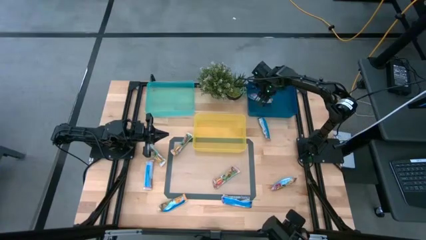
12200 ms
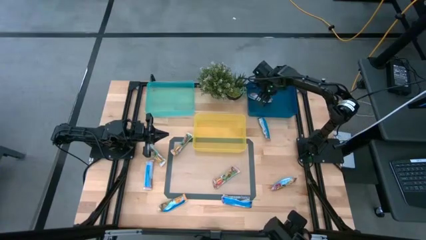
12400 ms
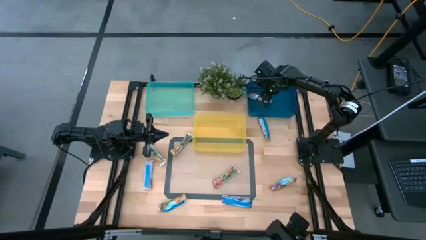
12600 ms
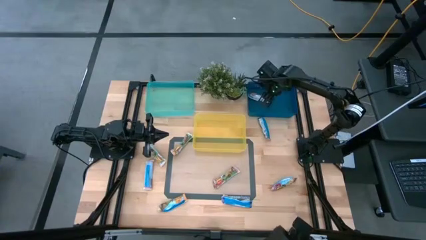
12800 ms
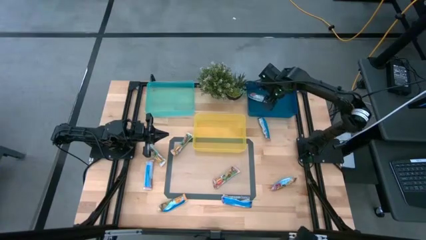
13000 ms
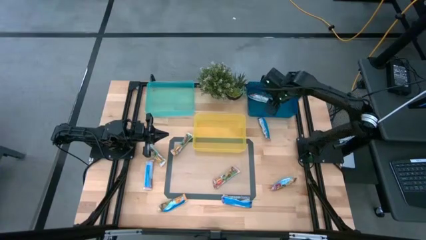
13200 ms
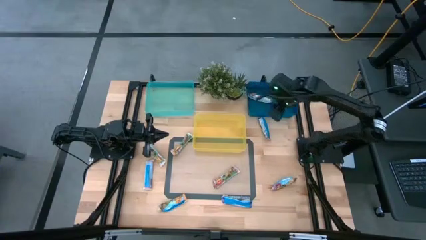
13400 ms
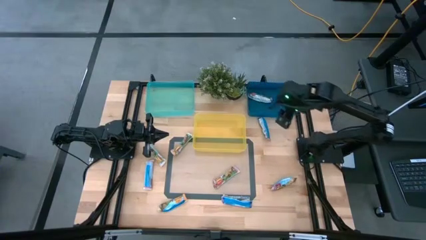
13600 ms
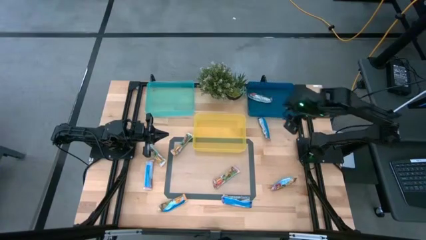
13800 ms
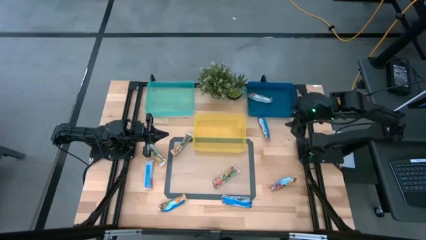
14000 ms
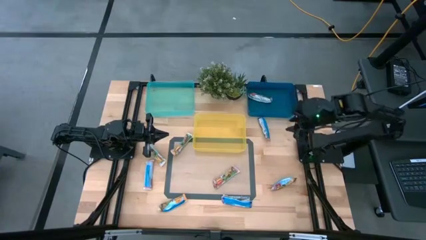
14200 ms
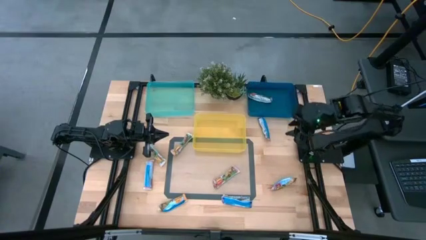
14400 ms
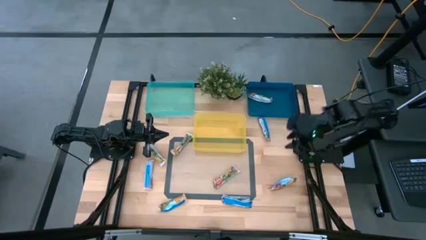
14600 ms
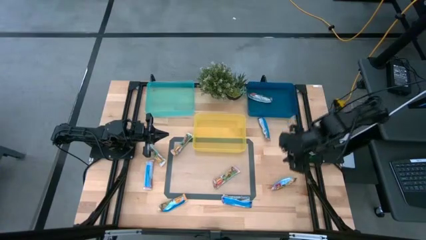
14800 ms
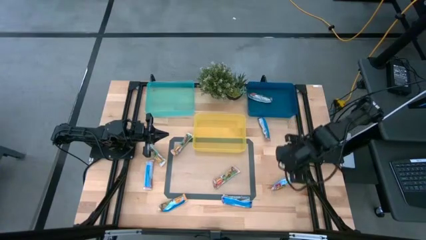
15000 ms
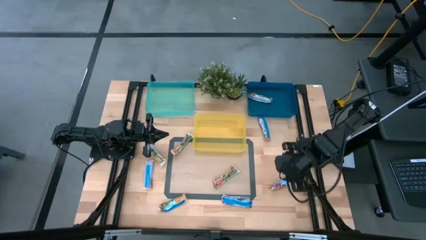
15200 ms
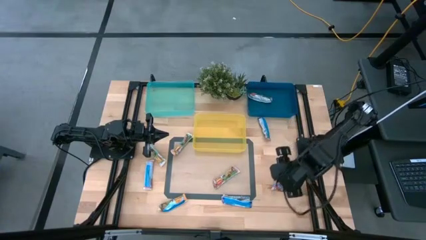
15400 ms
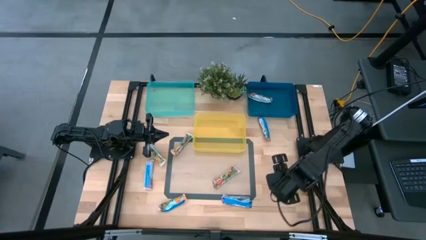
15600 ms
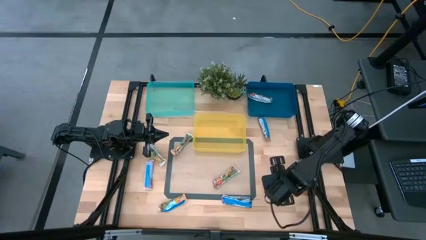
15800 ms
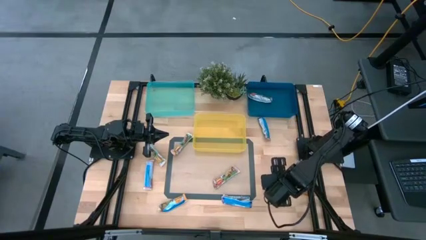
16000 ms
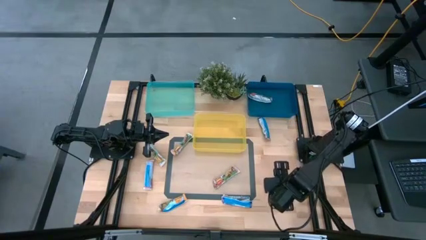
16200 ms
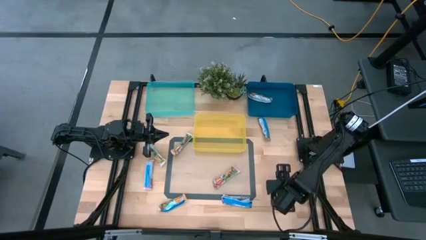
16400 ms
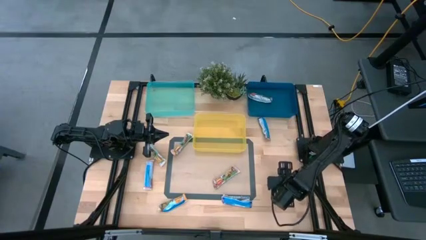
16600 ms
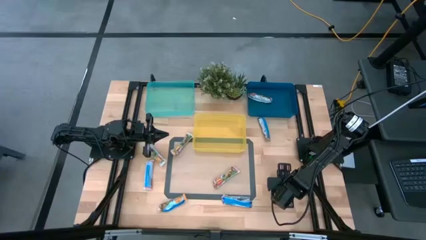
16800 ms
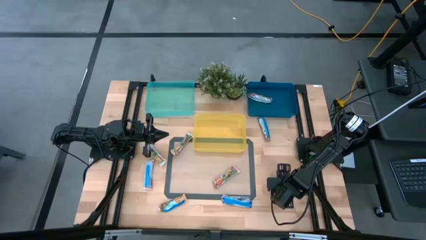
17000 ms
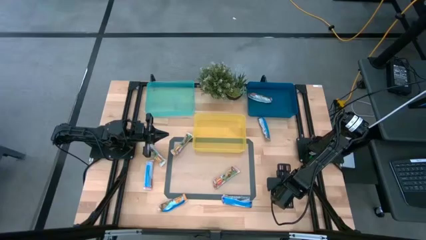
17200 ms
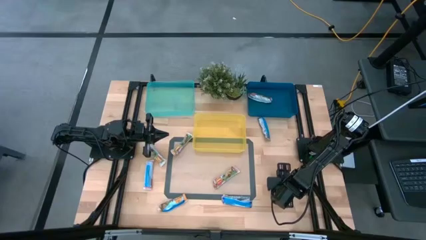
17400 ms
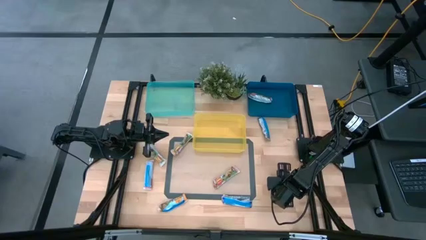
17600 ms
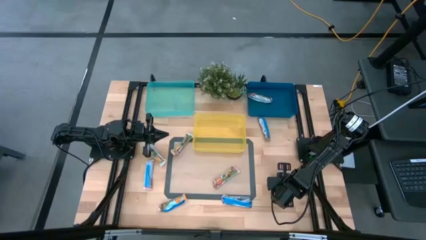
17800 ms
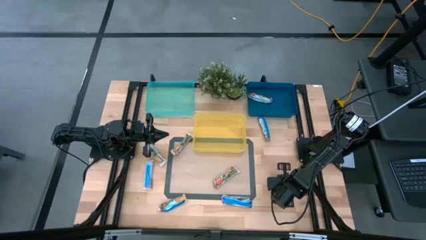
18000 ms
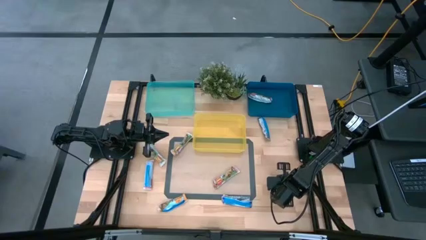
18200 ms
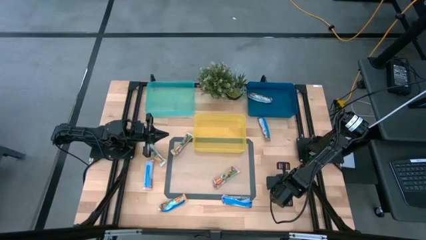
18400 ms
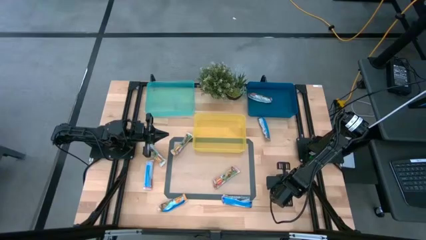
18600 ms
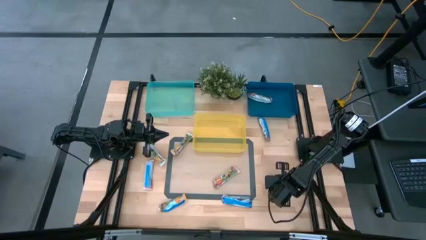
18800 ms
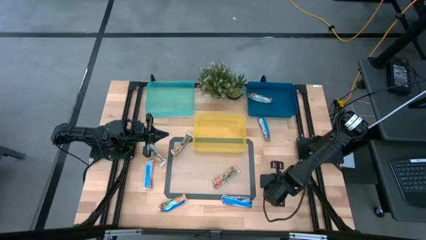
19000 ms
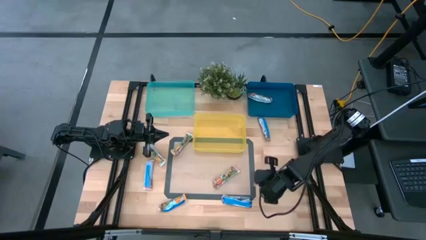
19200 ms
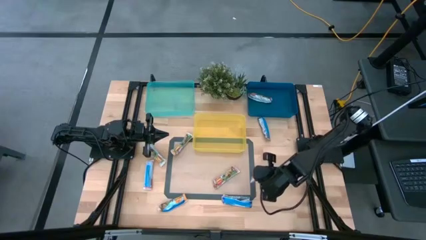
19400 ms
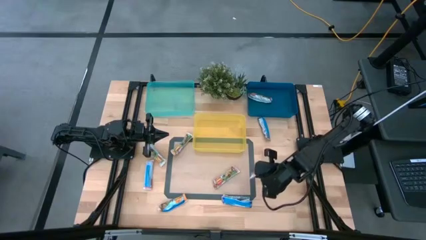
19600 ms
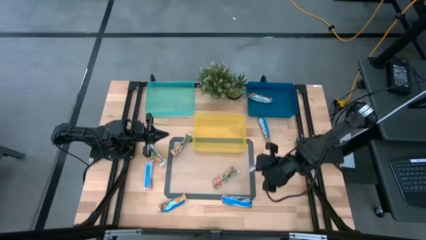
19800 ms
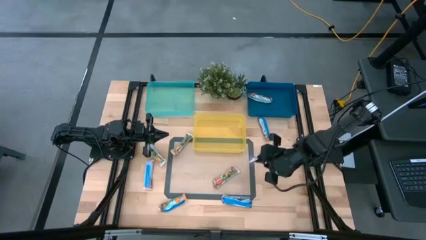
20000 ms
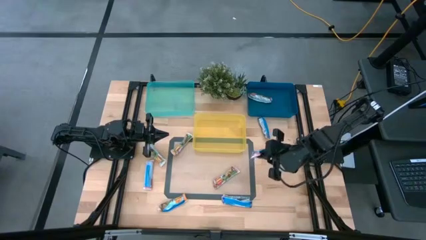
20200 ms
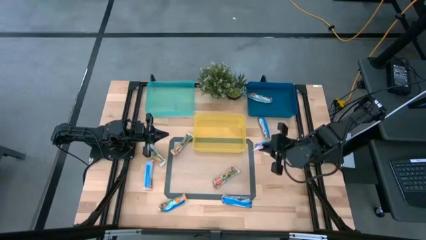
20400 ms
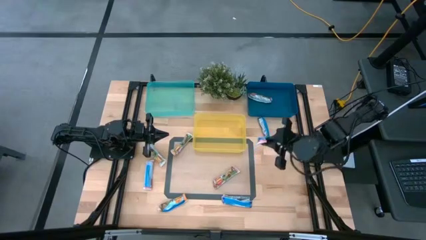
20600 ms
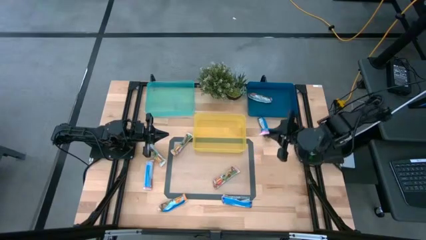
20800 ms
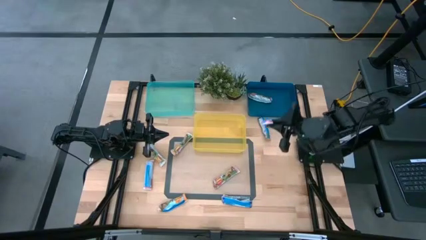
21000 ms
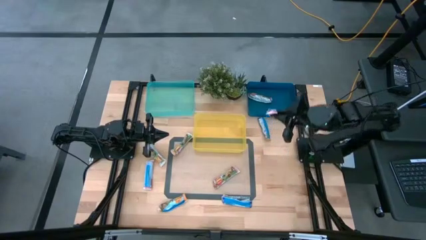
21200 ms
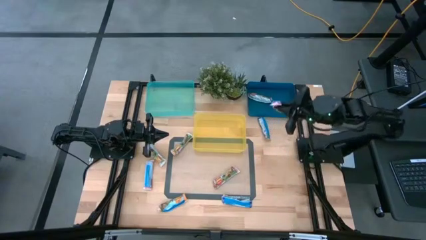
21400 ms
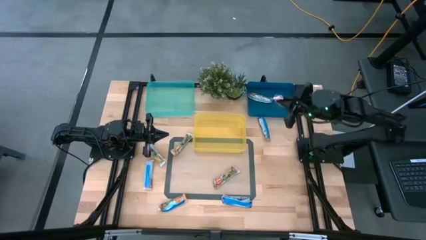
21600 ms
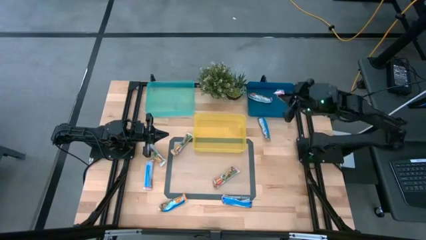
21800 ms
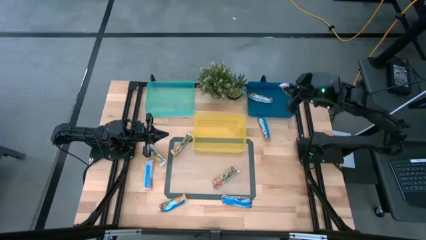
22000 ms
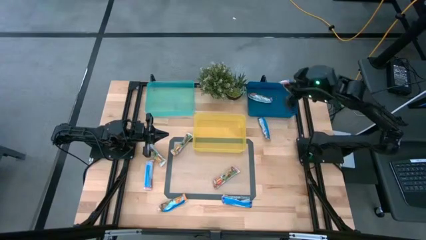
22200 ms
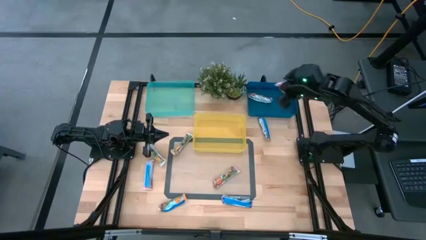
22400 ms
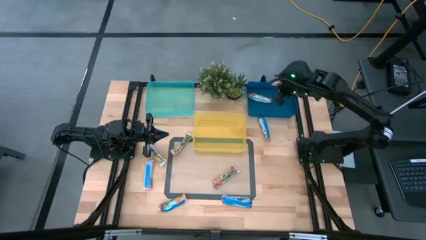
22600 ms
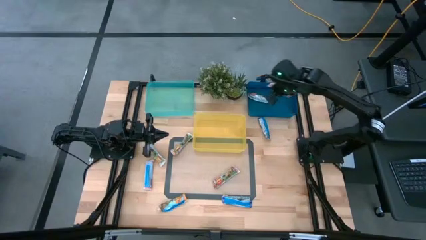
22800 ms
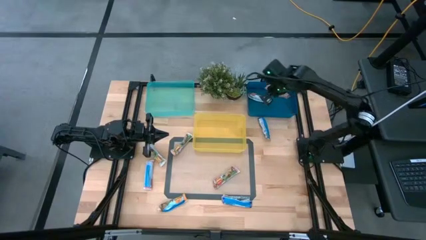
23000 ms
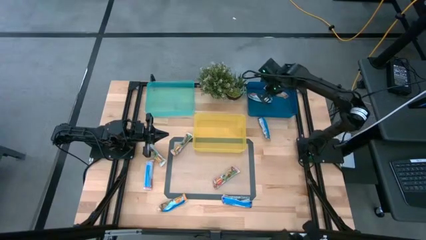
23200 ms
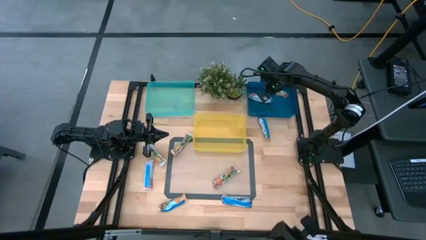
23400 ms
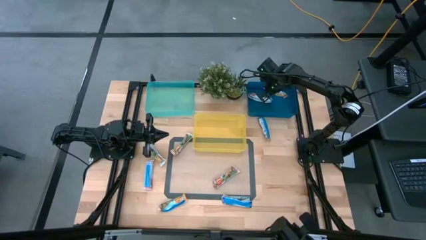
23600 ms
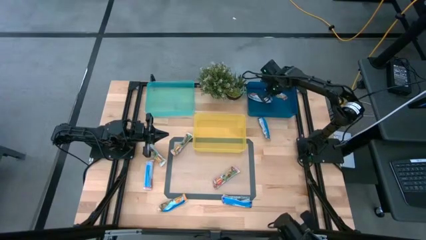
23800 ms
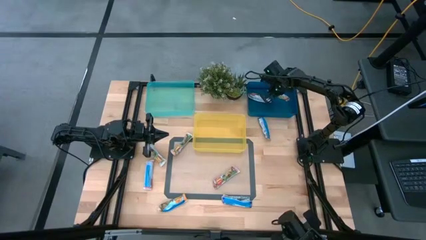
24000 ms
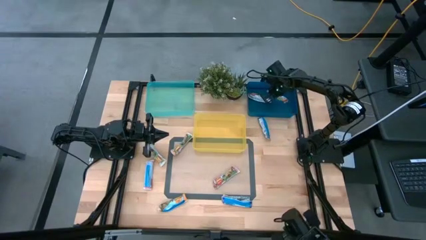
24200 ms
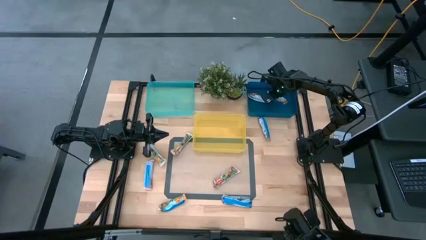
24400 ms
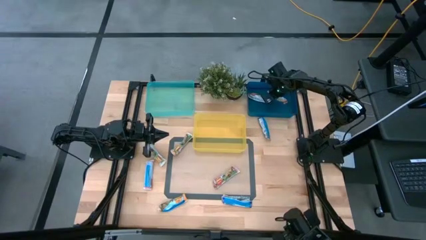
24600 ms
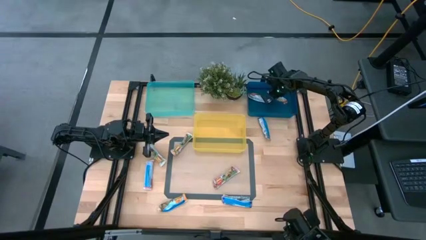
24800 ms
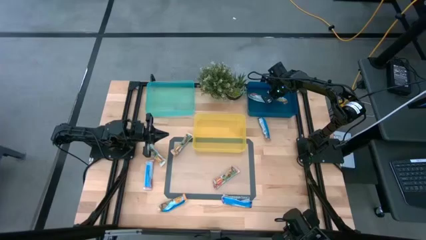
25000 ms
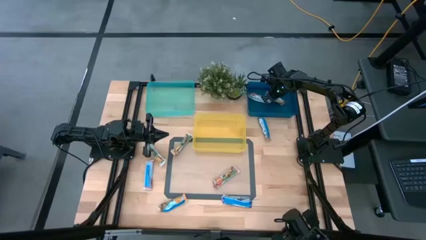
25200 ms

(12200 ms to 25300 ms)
Task: Pick and place Granola Bars by type
Put the red granola bar into the blue bin
